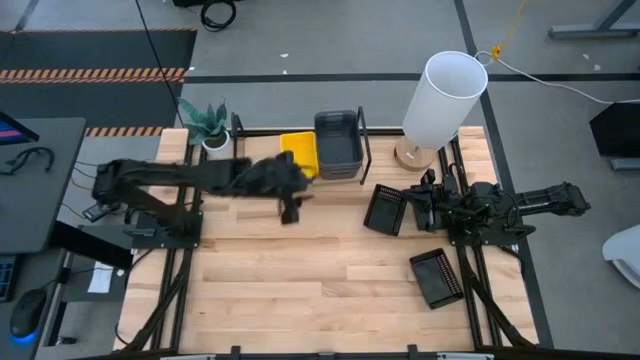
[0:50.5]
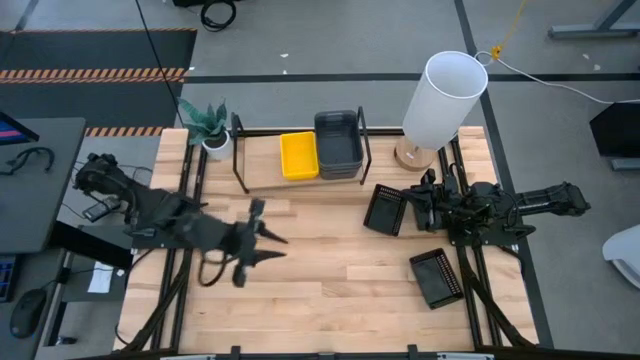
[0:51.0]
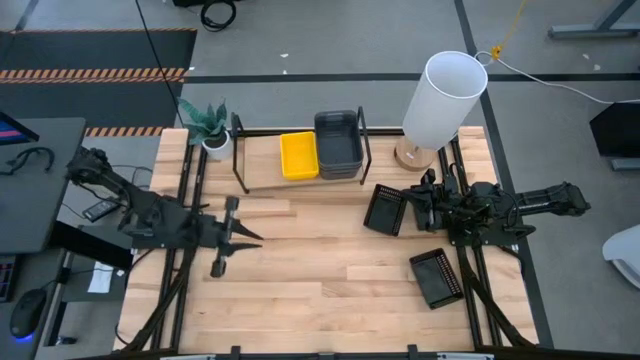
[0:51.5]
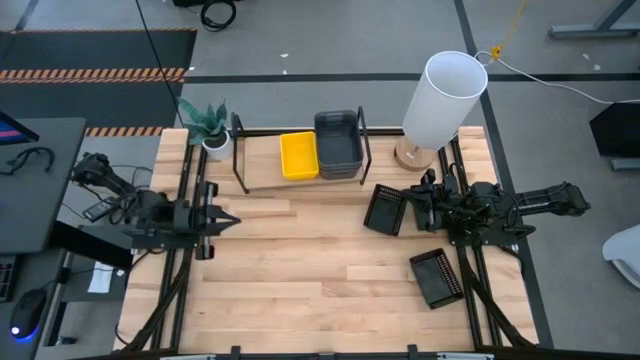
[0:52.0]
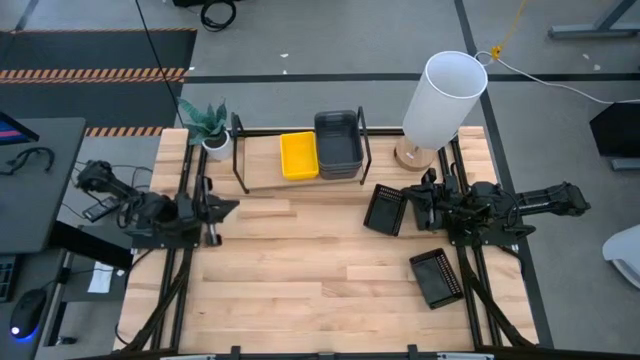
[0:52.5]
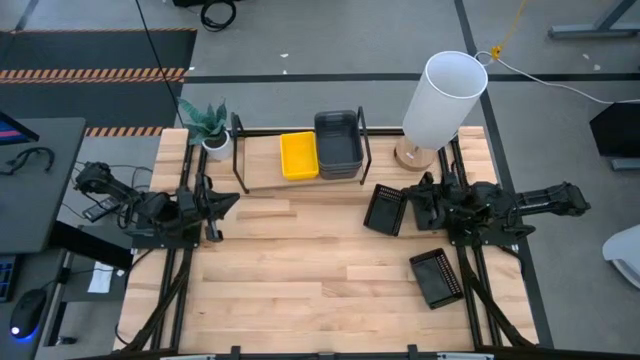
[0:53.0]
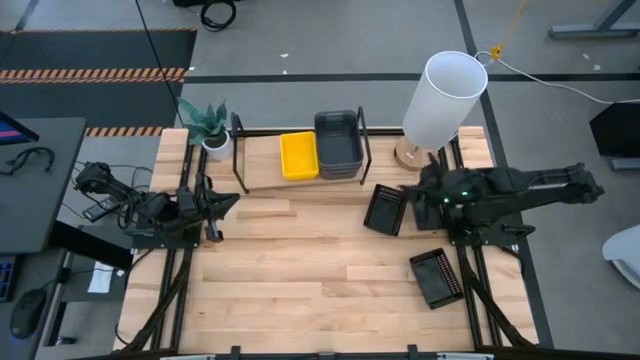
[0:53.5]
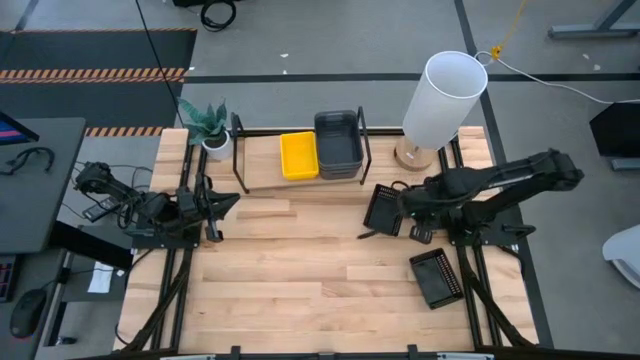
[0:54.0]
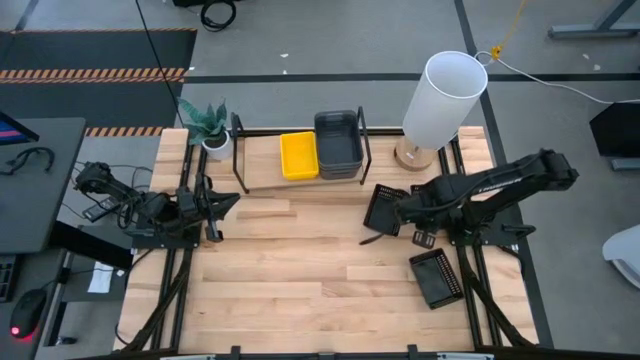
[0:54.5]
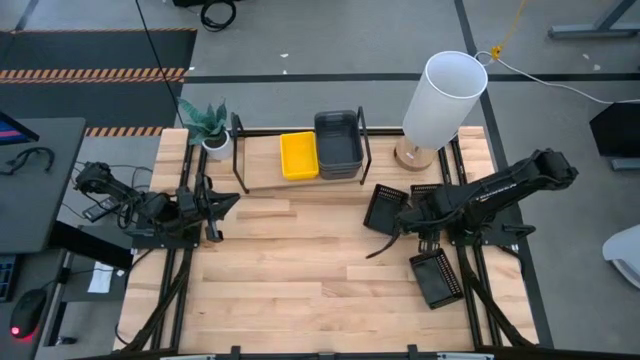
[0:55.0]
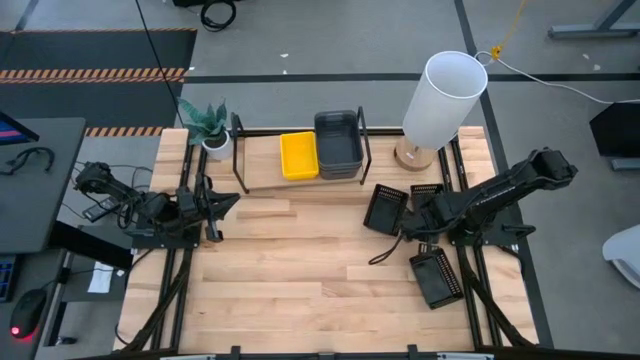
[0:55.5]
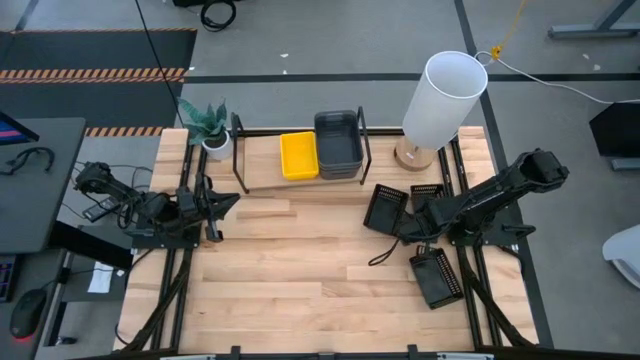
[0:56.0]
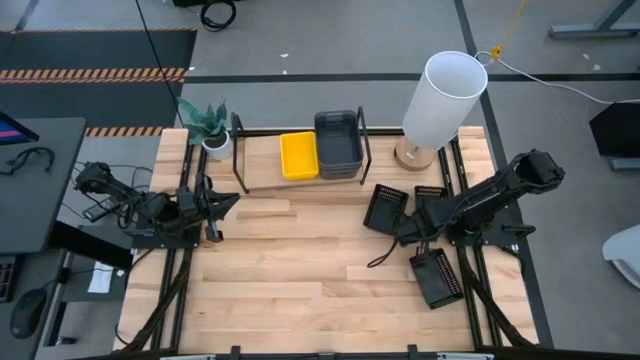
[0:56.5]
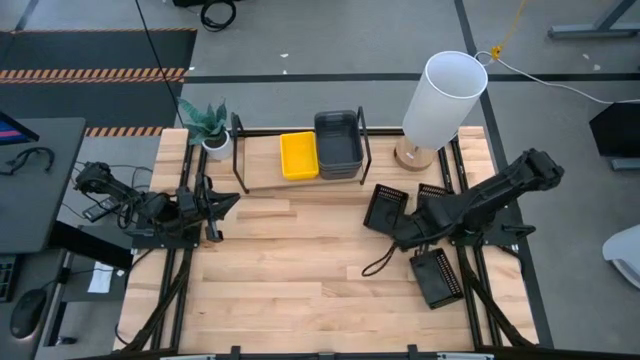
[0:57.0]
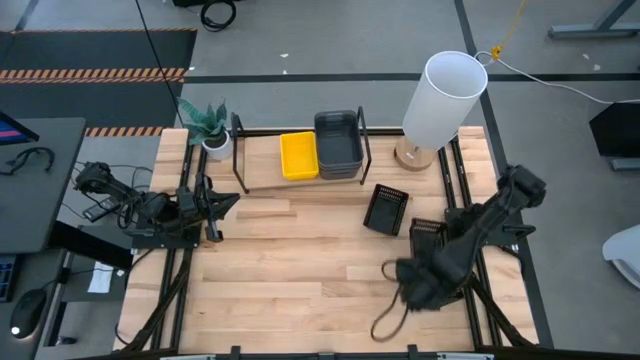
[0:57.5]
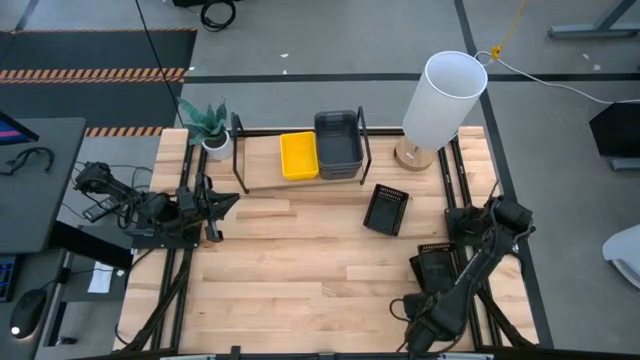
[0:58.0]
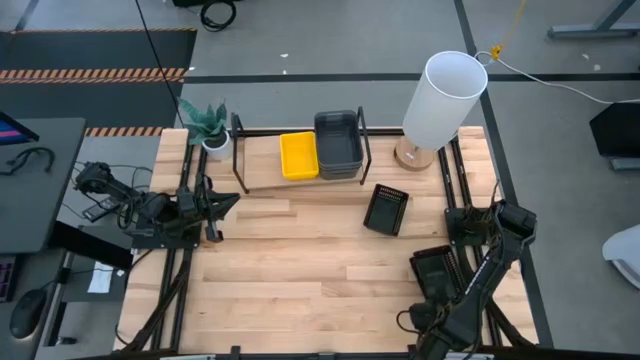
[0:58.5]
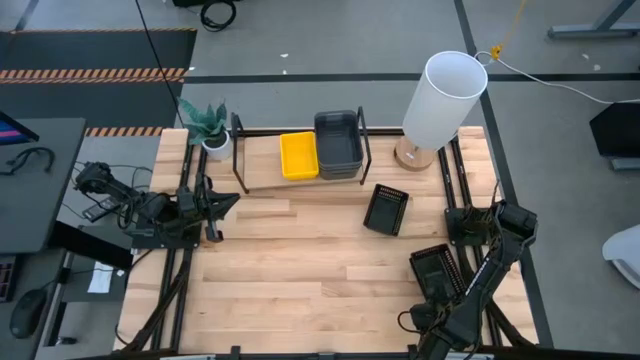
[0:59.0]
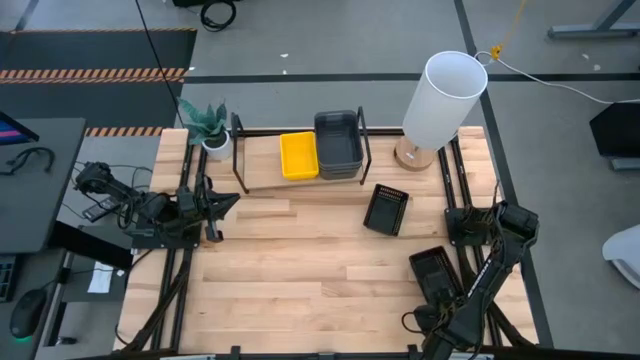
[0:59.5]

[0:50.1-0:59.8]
Task: Stack baskets on shelf by color
Stack the top small right black bin on top of the bottom small black bin

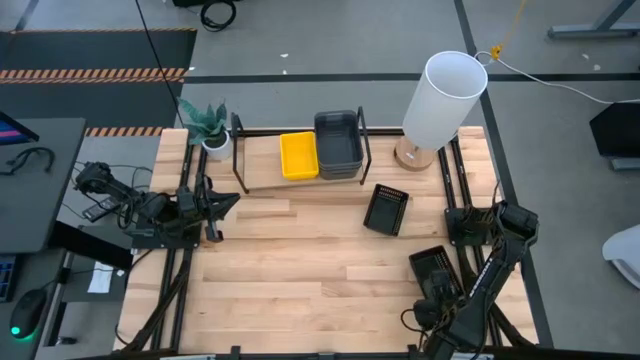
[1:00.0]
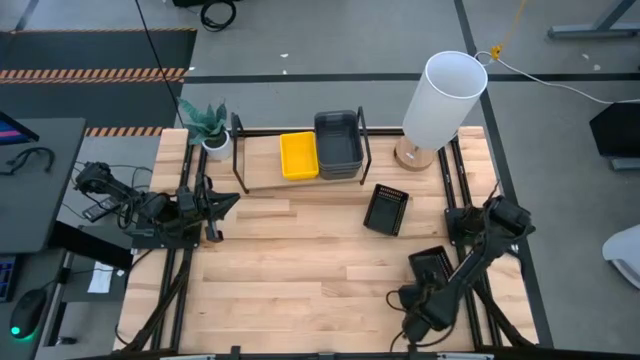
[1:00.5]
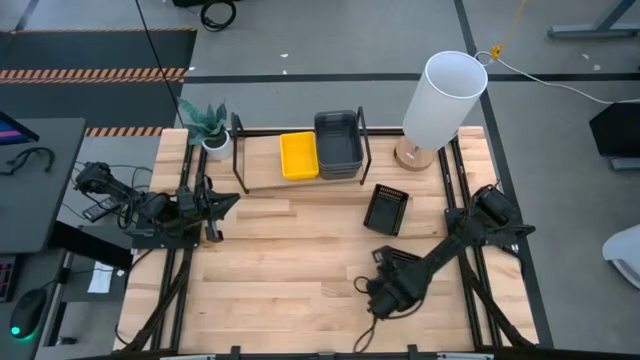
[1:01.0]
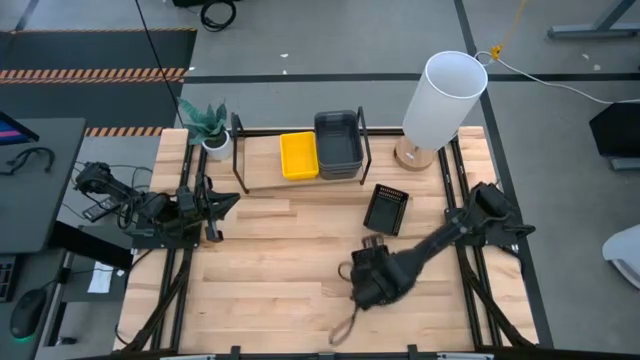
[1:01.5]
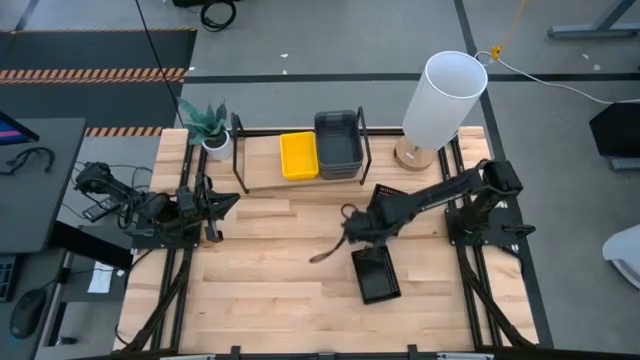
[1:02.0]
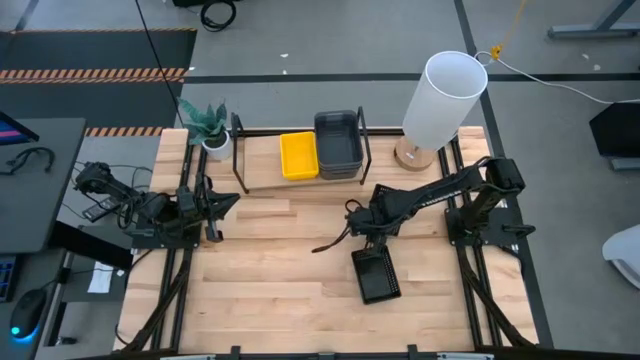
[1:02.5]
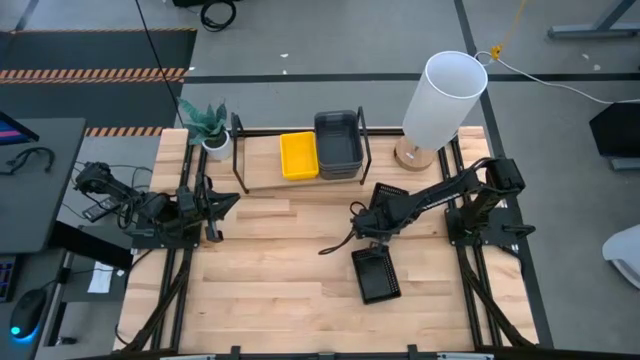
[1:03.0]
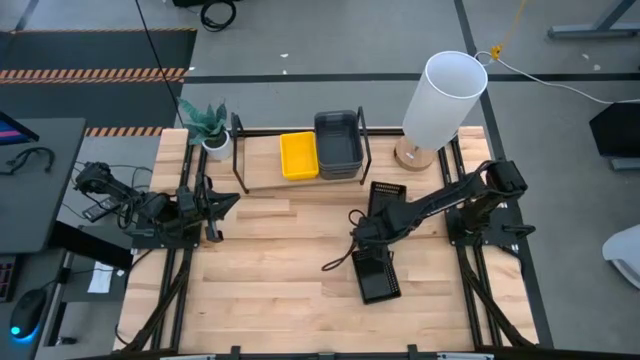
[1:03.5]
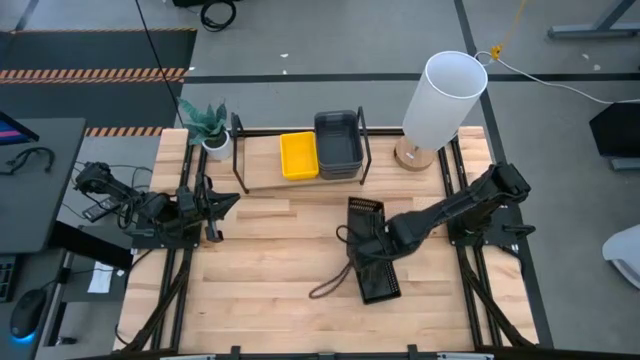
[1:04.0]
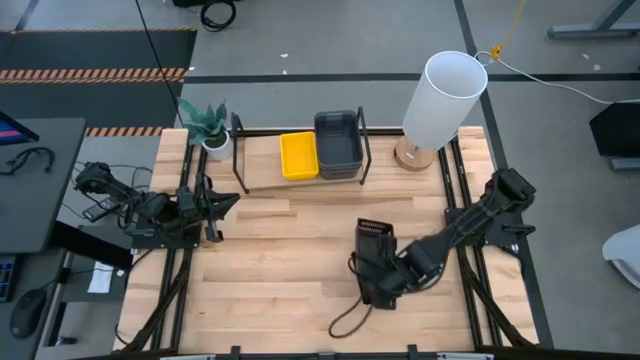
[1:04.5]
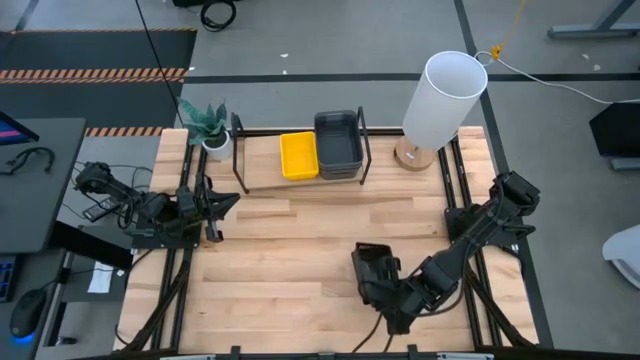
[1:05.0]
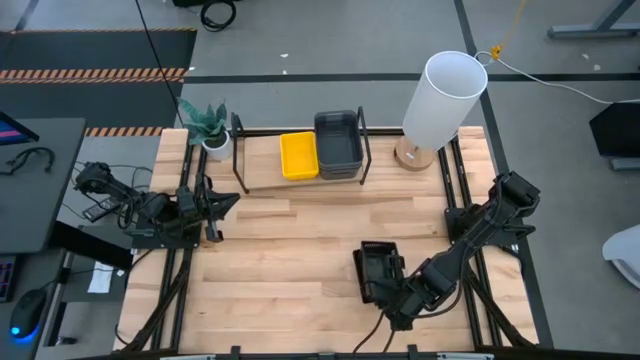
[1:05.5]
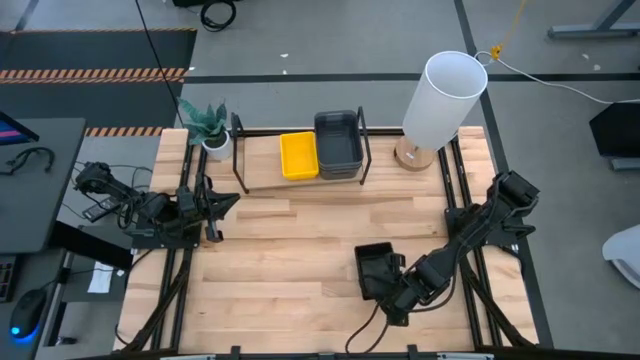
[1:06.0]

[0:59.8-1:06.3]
Stack the top small black bin on top of the bottom small black bin

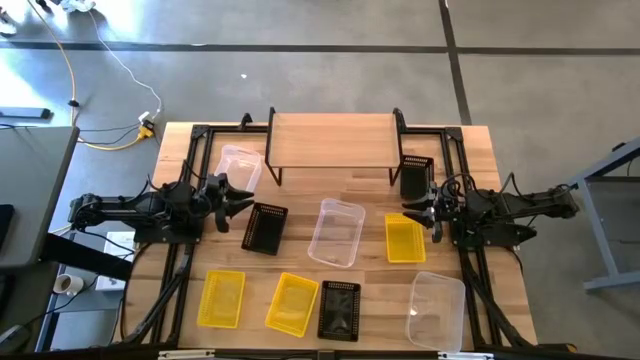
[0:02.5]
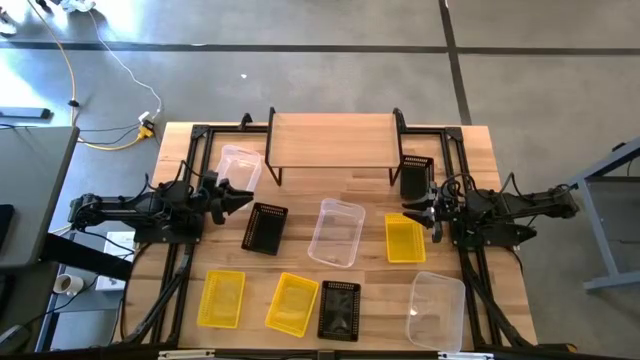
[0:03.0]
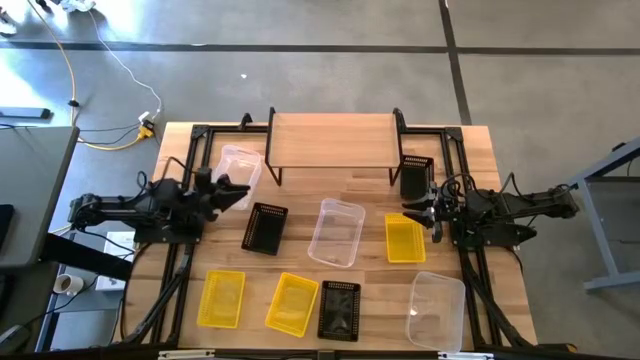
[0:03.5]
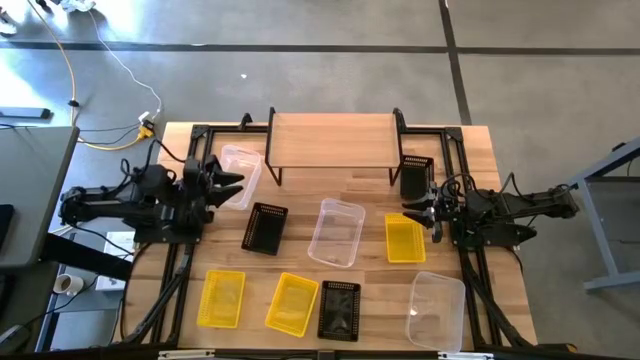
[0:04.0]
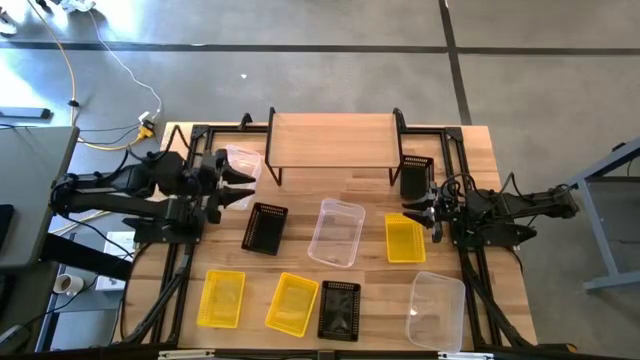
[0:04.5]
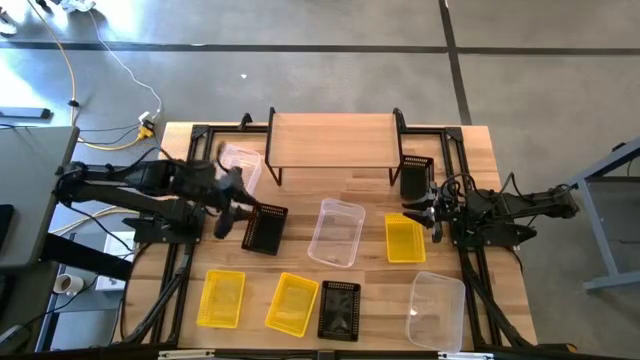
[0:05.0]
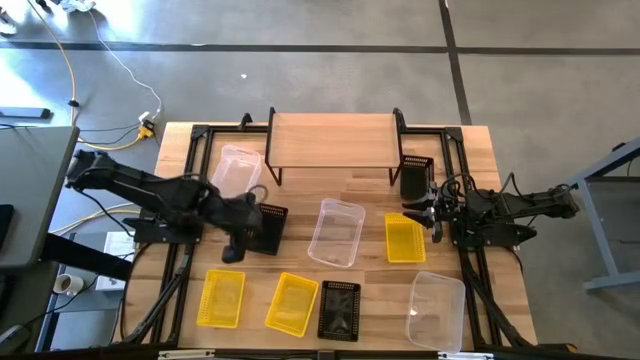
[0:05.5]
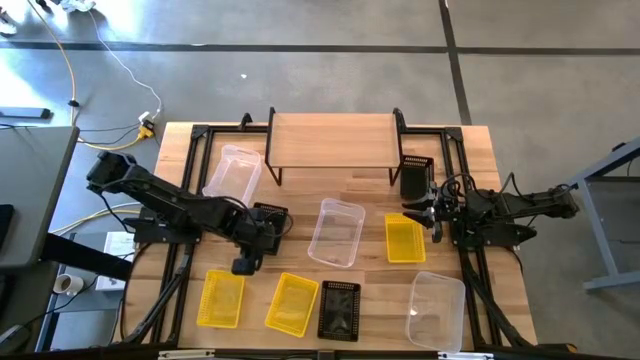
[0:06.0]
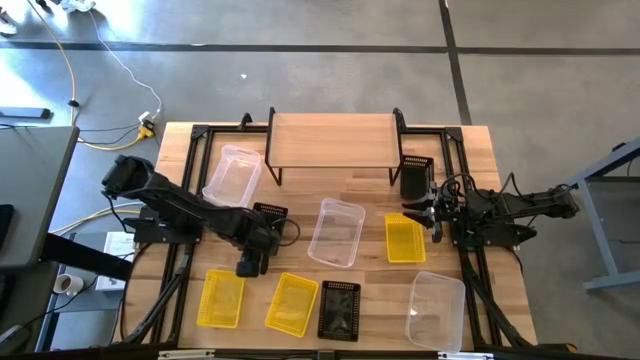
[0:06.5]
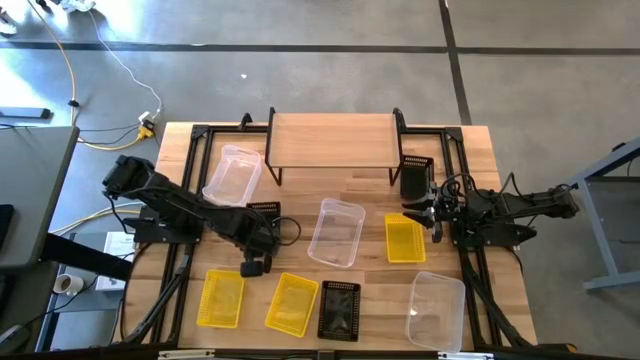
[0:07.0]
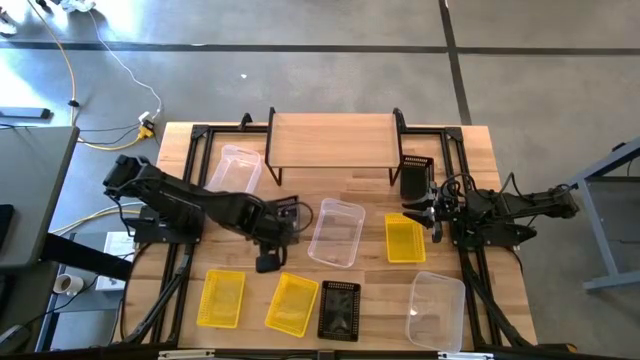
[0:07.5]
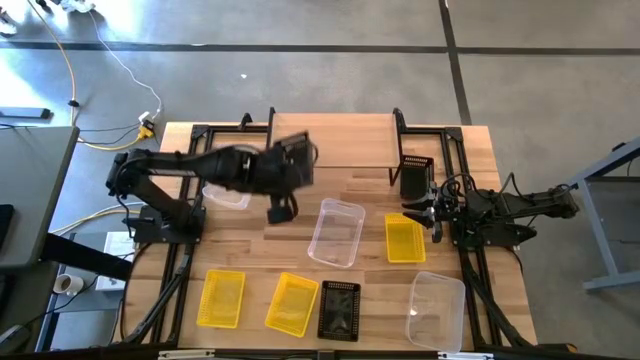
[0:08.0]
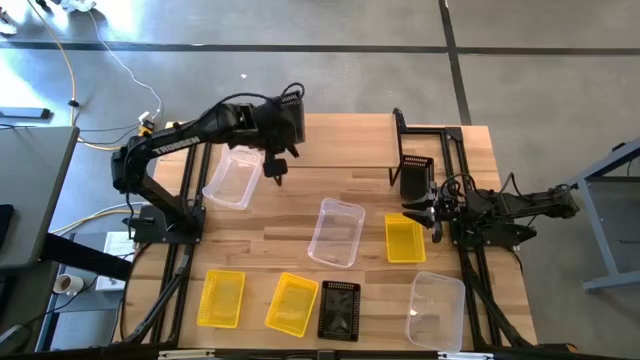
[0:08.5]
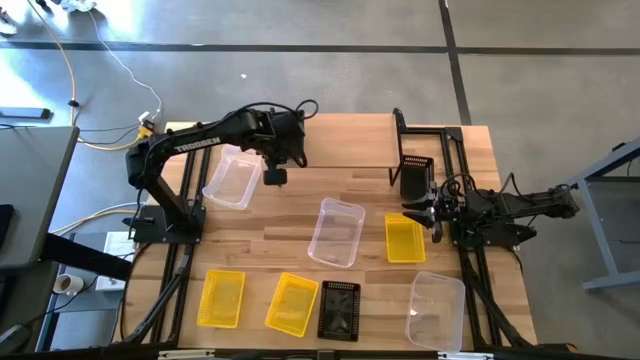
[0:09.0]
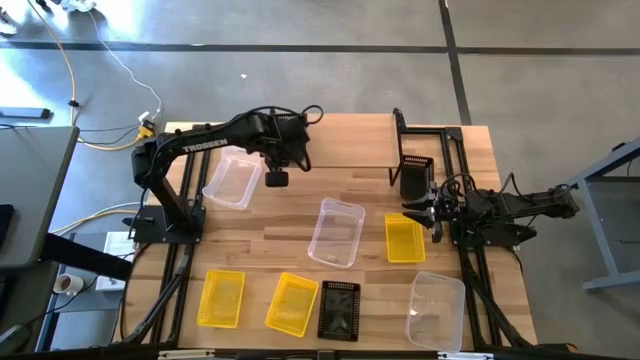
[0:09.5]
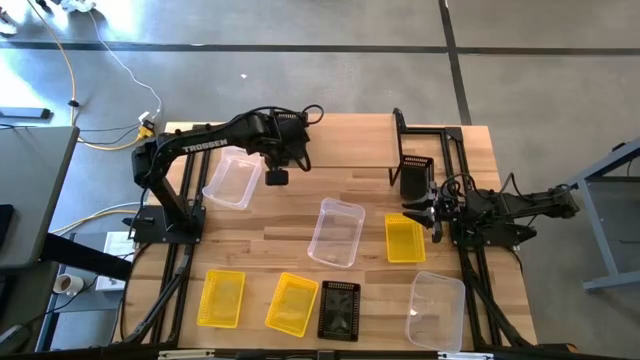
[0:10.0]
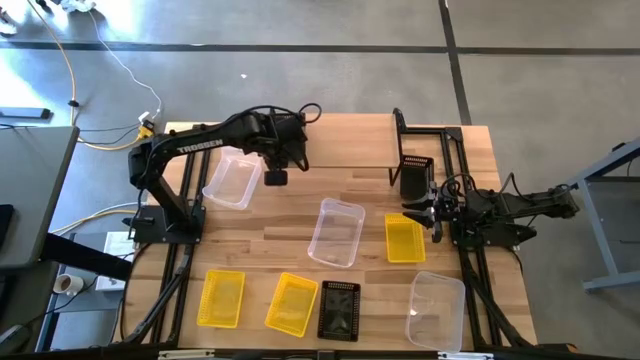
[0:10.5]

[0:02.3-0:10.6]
Task: Stack baskets on shelf by color
Put the left black basket on the shelf
